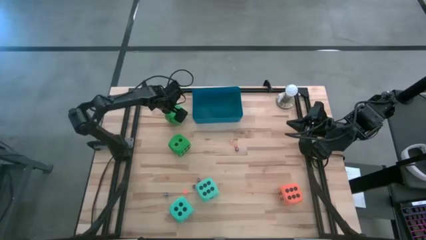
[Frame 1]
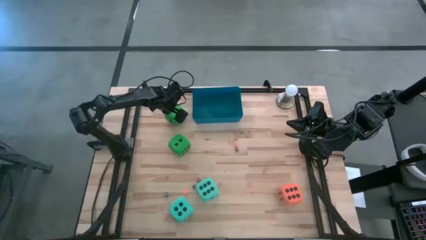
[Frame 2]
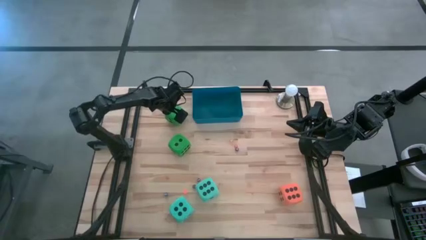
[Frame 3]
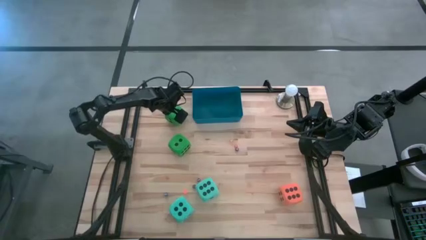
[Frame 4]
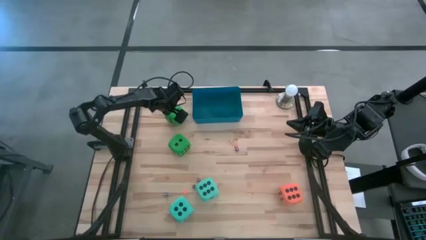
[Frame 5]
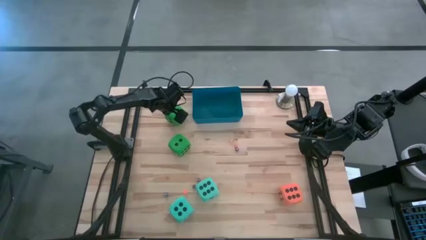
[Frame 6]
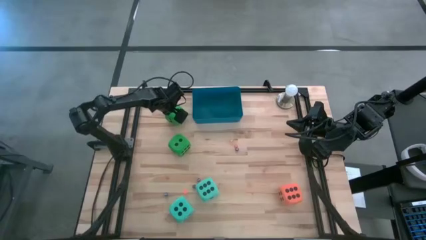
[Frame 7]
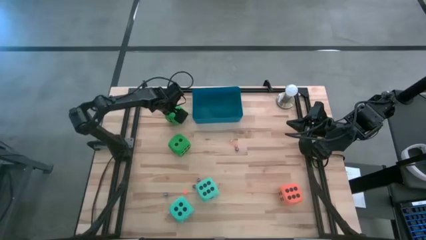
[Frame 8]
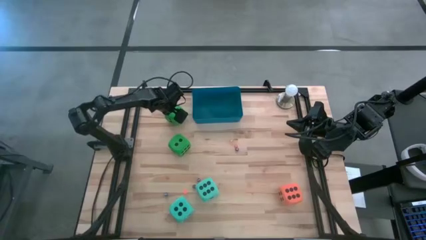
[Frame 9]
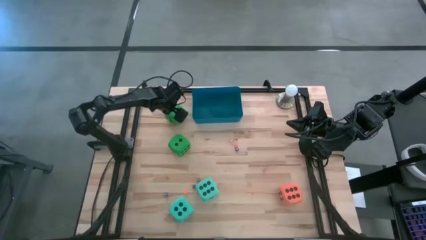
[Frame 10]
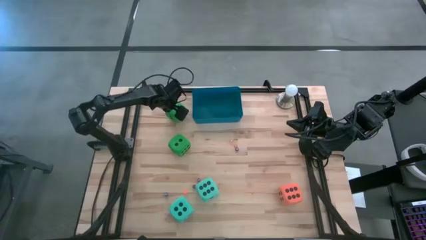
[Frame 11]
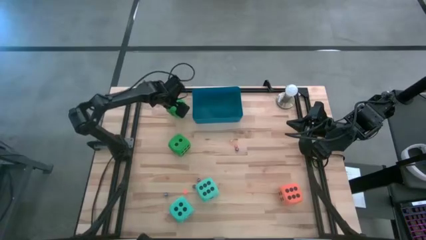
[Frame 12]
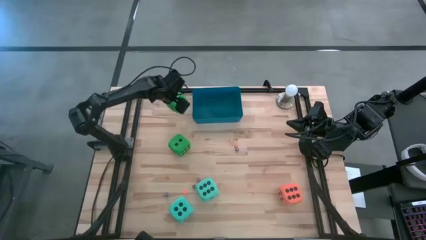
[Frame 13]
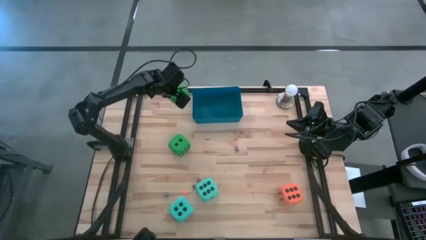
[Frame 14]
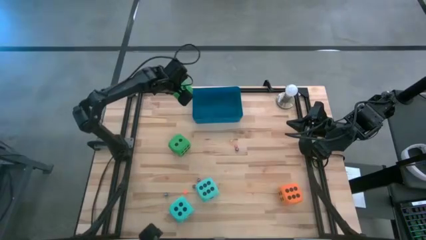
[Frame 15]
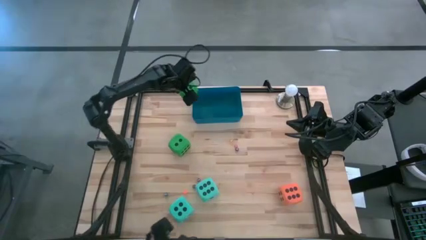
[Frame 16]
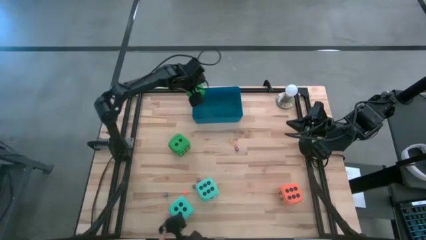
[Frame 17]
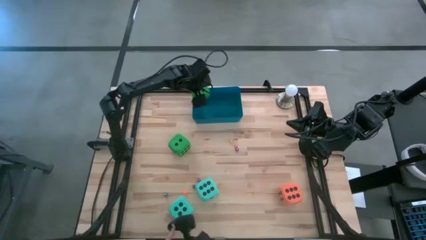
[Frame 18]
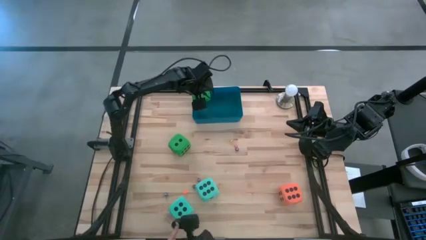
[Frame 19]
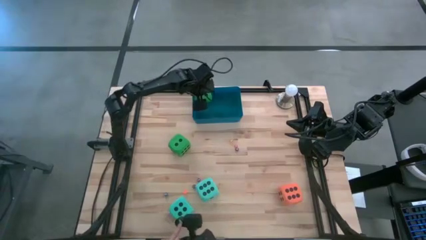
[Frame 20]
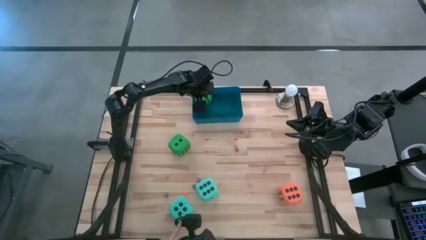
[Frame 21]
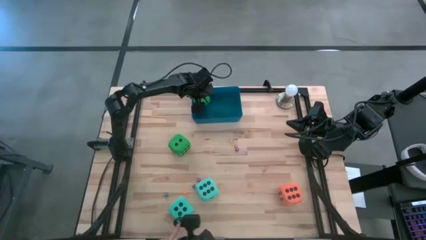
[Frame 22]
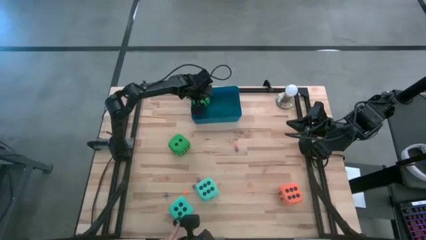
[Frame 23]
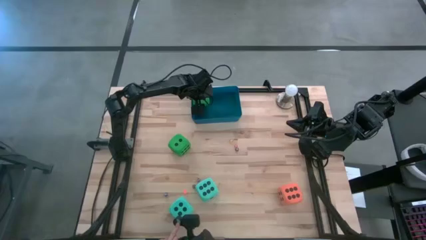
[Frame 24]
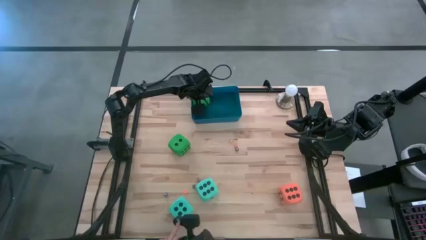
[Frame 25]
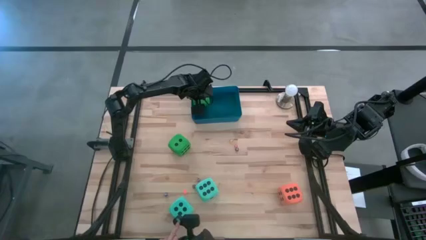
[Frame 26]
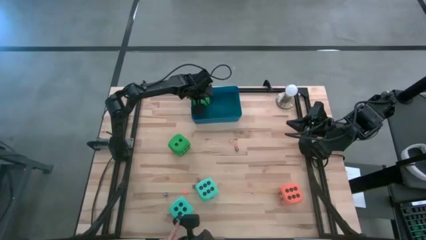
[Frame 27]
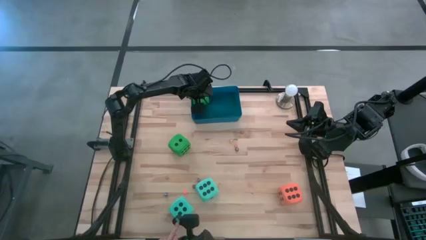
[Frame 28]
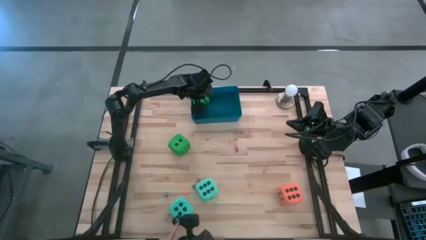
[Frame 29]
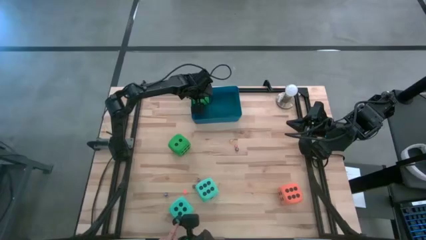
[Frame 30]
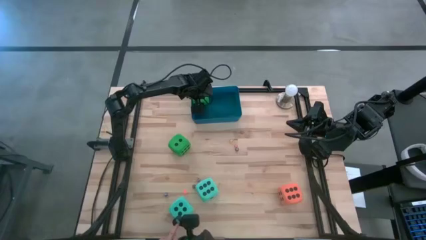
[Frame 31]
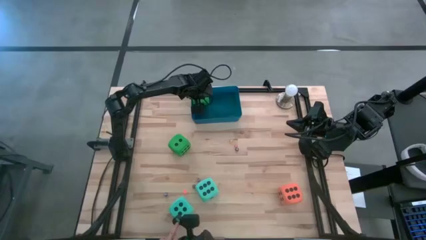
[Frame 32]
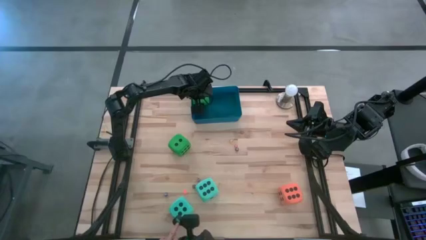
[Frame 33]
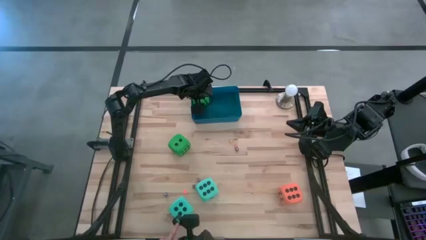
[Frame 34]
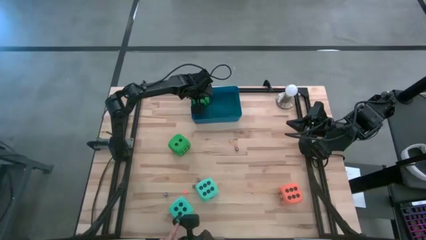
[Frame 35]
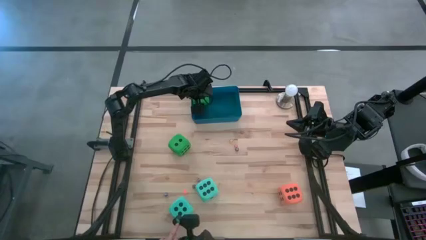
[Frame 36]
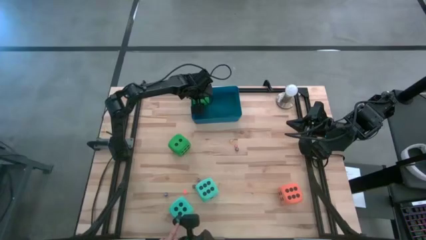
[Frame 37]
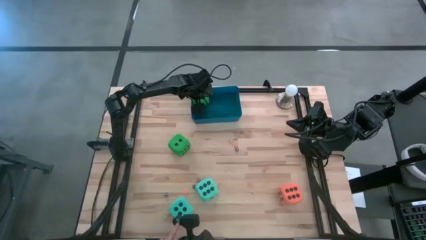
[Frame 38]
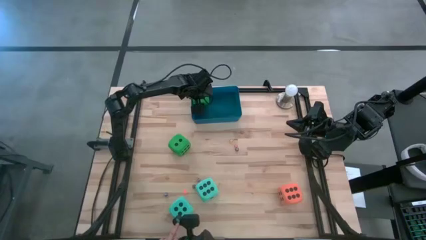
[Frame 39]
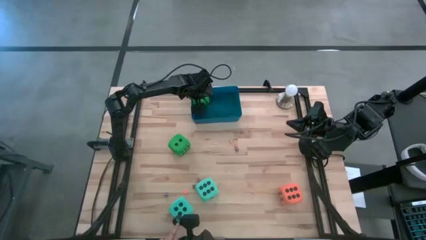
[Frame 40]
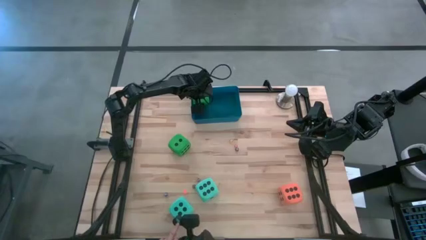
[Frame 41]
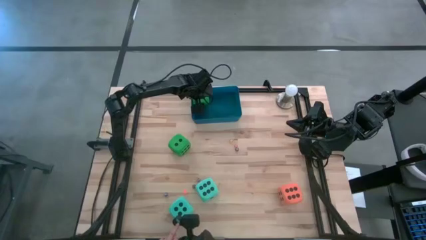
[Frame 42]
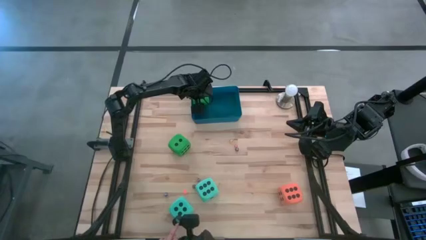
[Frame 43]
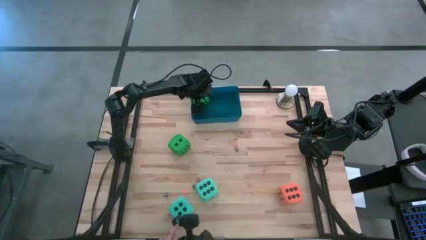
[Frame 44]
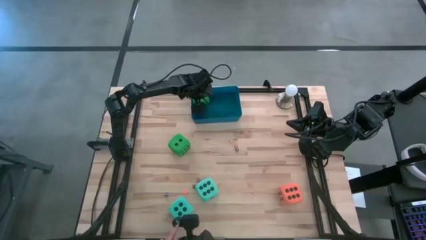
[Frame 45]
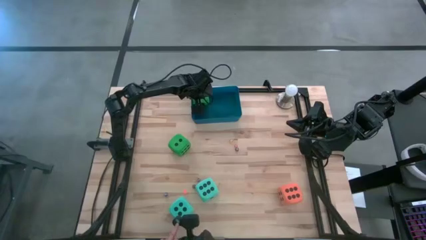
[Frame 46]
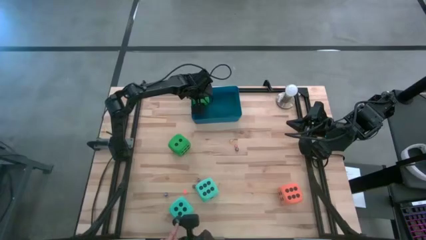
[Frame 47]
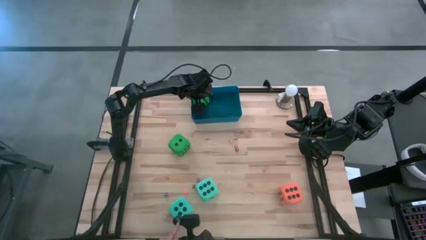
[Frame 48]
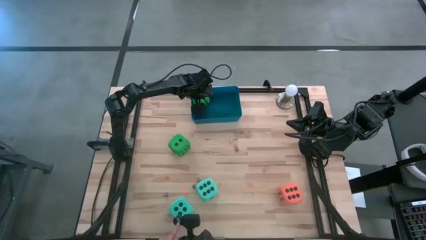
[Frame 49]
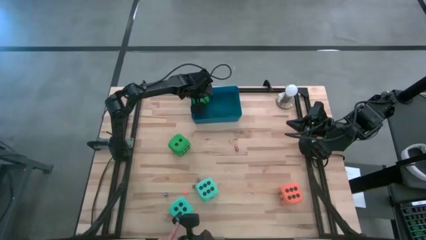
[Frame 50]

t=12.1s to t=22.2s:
Task: Pick & Place Dice
Put the top large green dice into the blue bin
